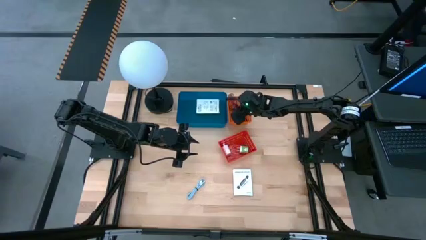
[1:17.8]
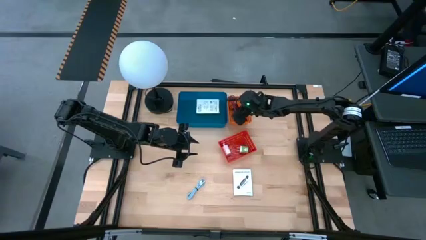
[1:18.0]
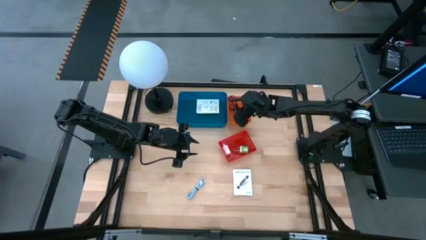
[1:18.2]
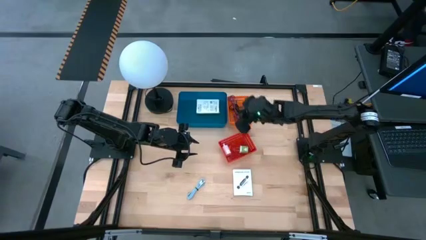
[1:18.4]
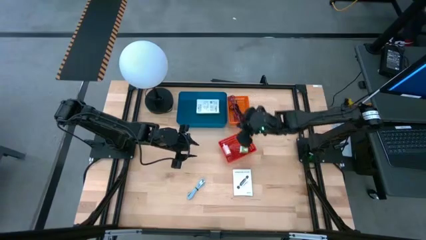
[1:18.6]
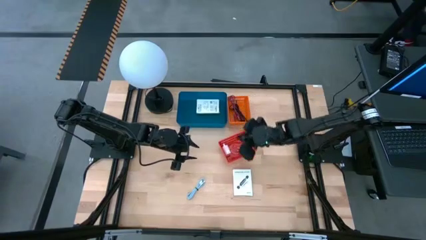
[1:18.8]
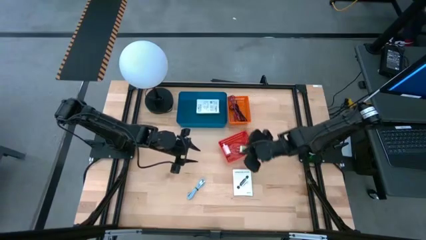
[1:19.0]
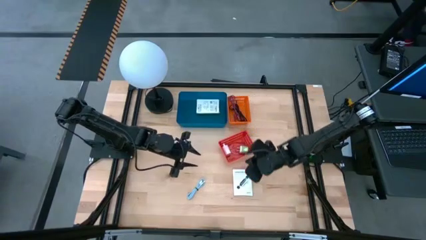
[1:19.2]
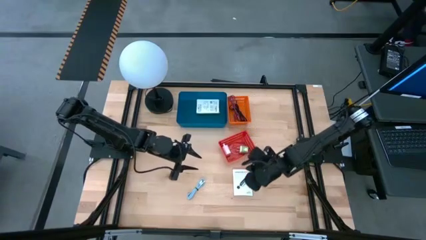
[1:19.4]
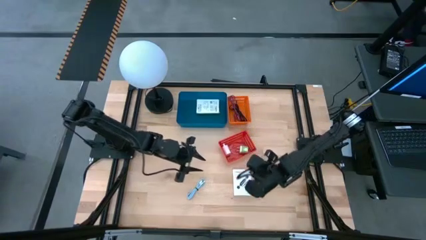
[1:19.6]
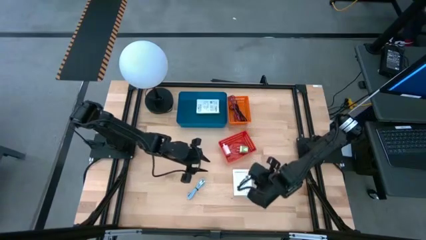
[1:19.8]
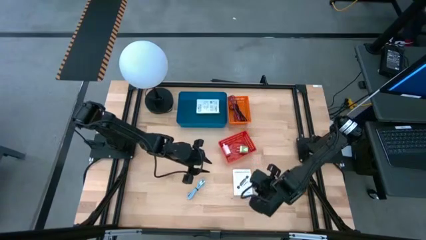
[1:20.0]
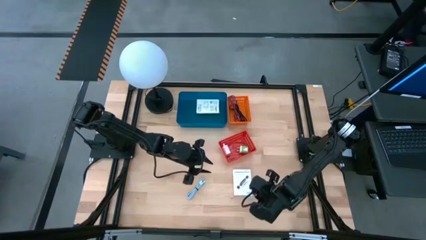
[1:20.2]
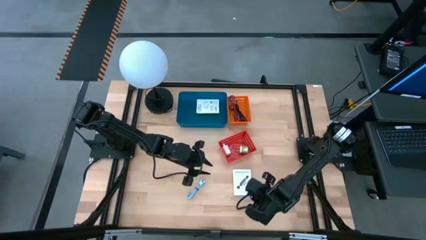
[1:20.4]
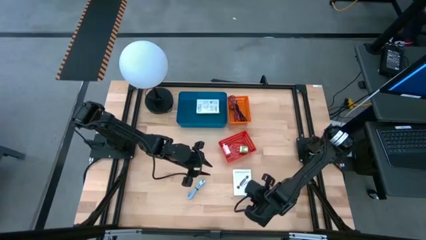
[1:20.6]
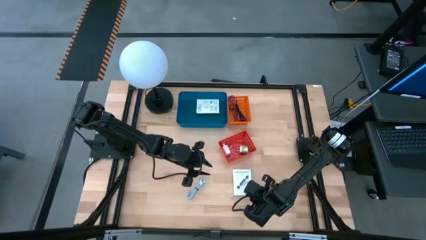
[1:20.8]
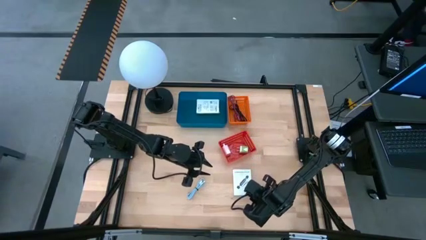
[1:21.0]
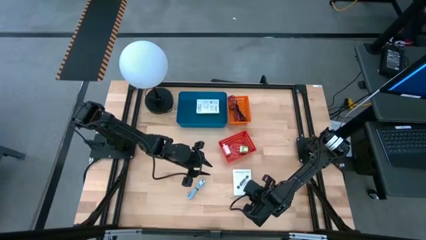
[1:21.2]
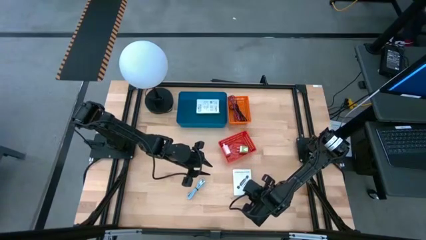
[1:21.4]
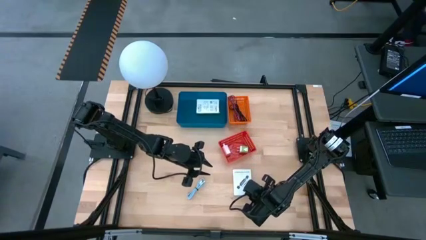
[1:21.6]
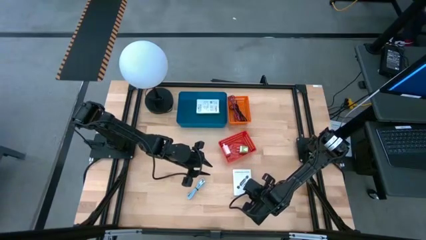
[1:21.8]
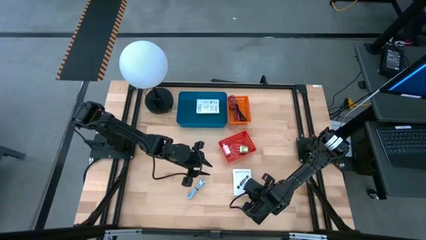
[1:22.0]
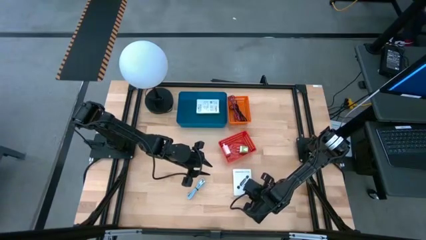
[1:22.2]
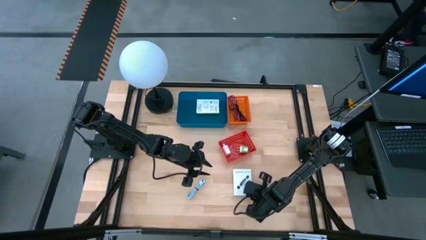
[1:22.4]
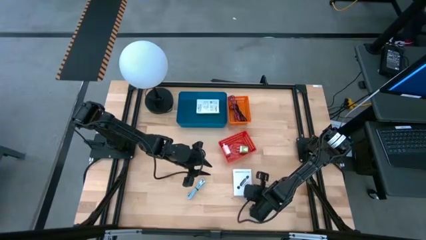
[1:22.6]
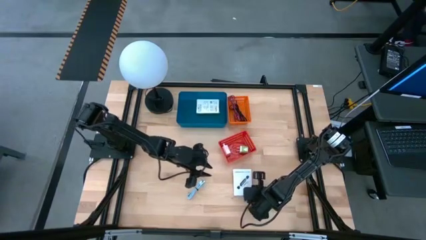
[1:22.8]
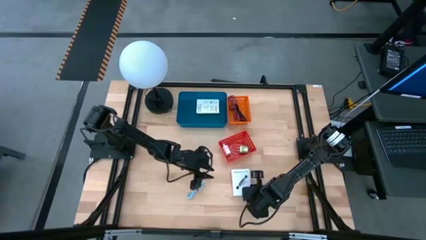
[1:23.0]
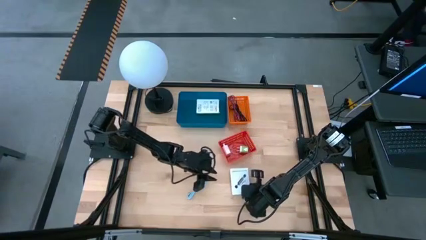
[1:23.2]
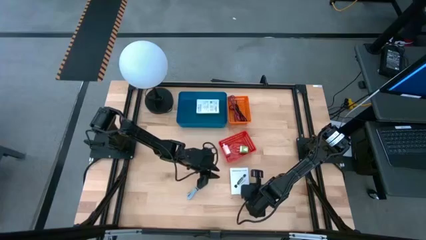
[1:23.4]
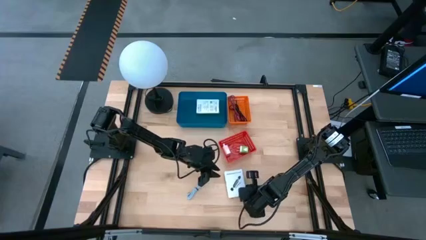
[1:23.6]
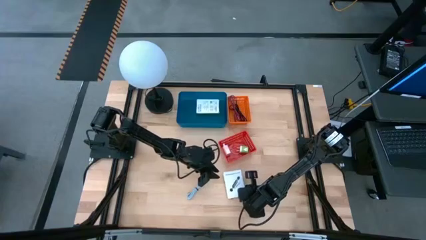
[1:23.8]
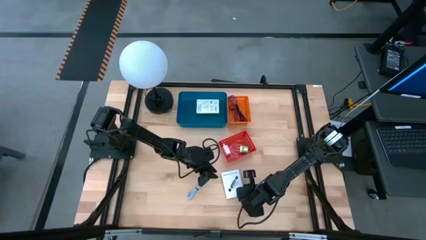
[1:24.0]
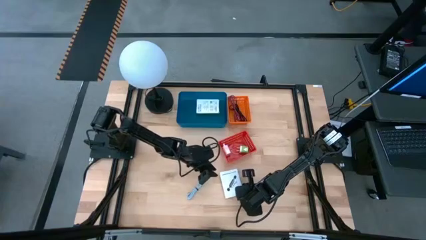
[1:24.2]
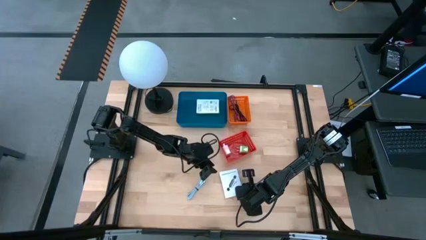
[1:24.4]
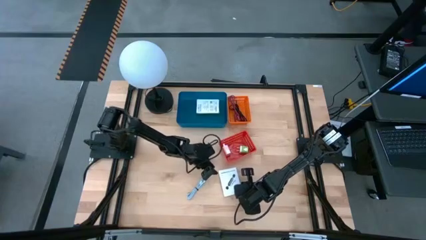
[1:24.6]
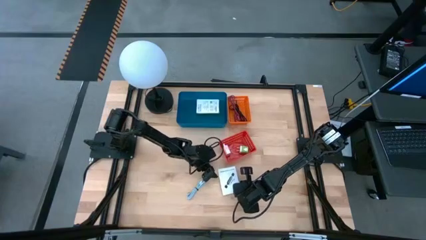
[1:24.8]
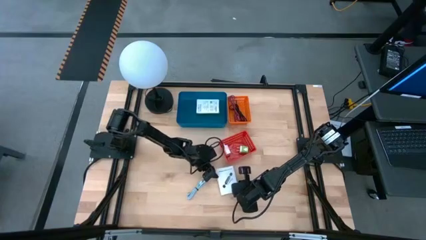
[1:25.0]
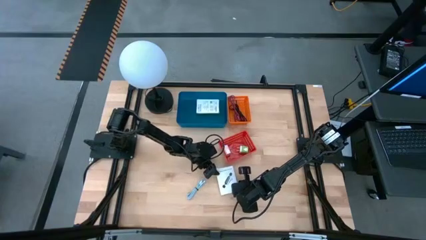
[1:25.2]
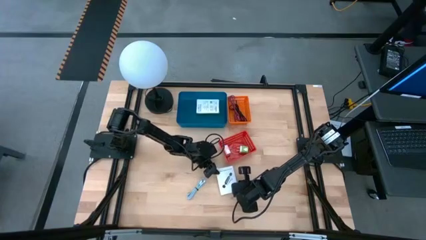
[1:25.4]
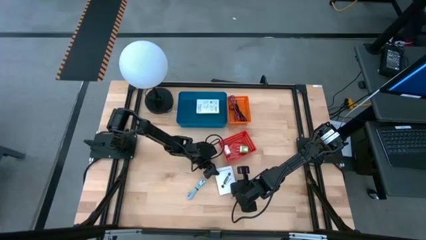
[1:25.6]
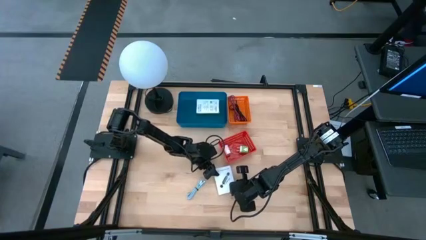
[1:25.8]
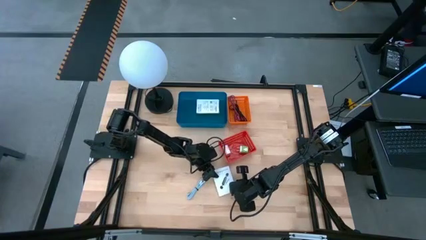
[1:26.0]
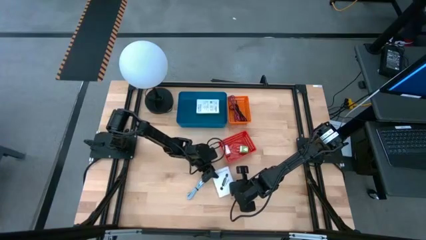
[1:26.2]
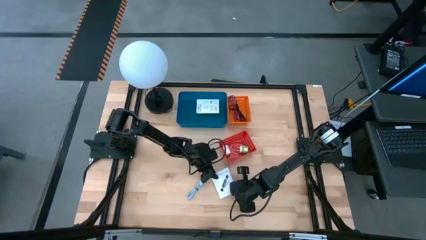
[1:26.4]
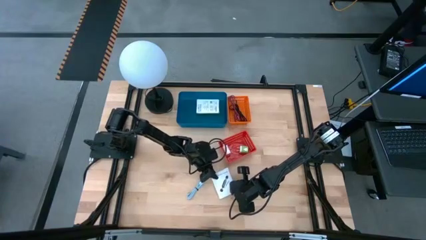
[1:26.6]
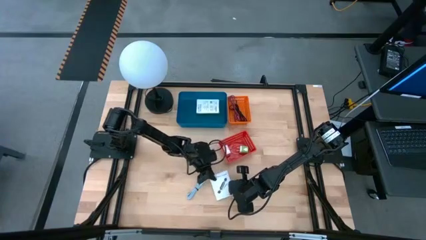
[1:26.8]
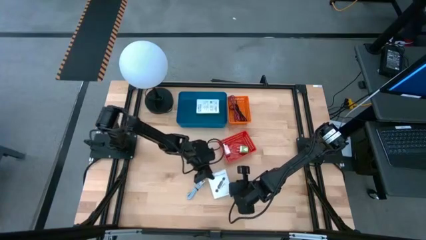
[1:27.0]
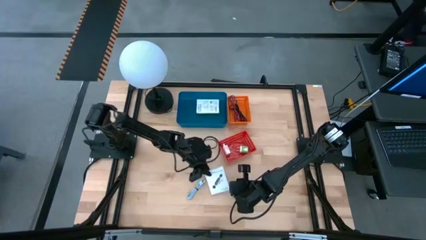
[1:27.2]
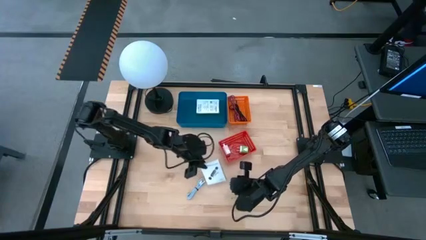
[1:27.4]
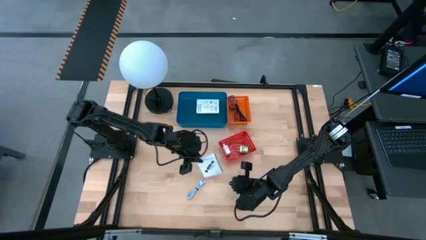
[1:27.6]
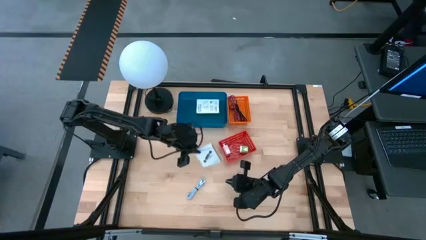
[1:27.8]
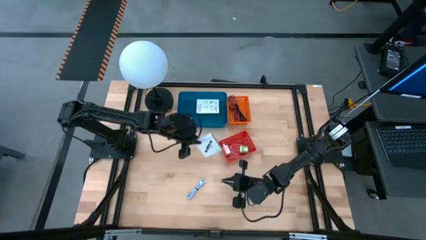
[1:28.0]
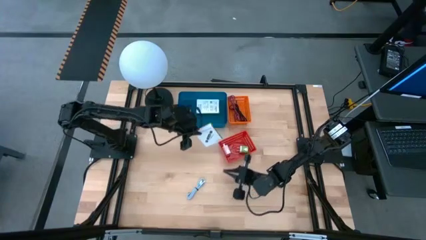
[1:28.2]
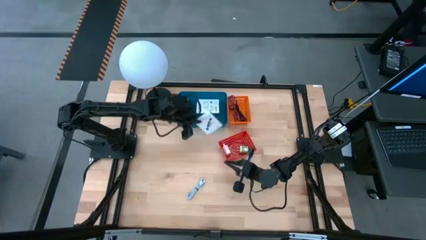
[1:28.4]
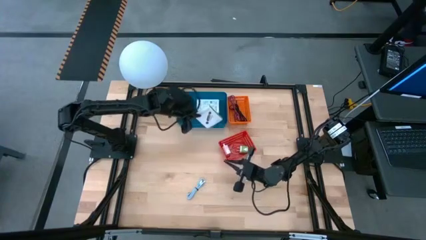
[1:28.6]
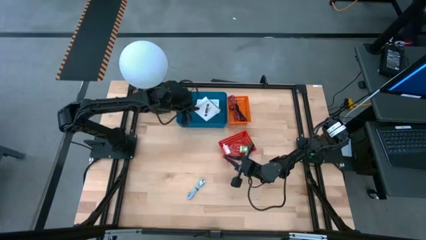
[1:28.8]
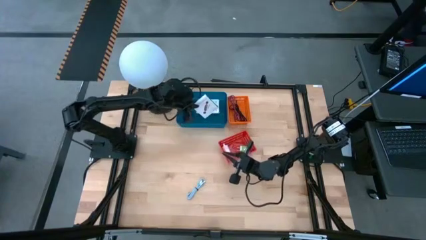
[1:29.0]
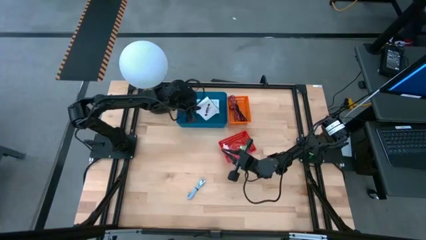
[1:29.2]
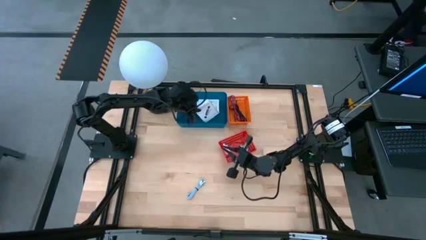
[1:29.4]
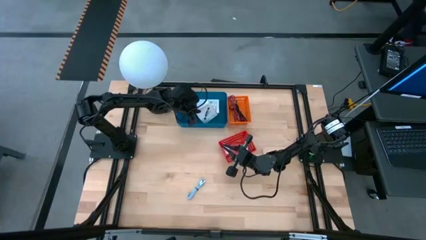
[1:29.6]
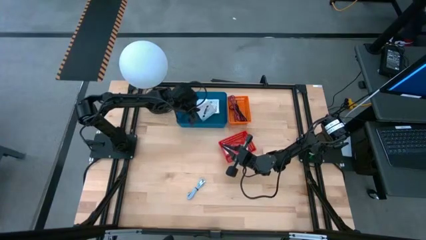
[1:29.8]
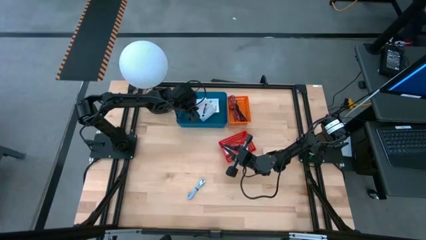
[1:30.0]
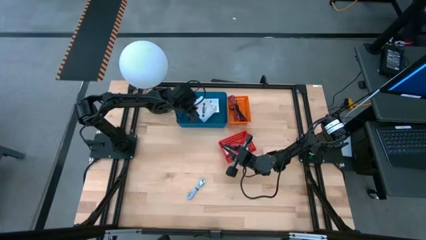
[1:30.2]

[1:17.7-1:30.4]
Task: Pick and place items into bin
Put the card reader box into the blue bin

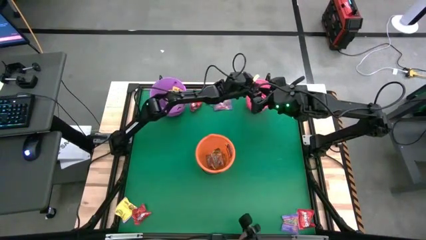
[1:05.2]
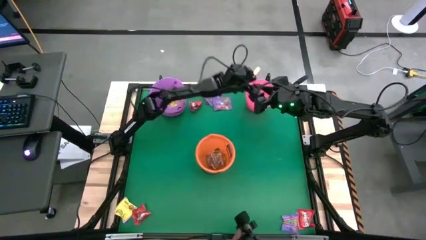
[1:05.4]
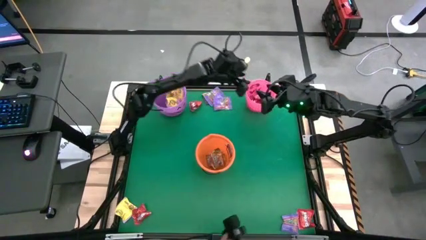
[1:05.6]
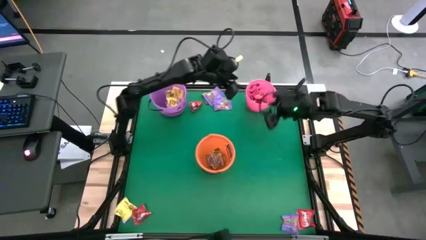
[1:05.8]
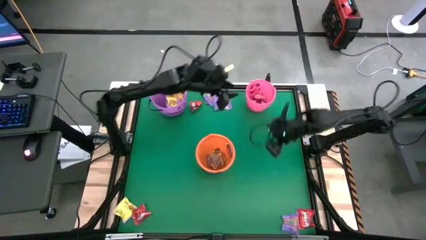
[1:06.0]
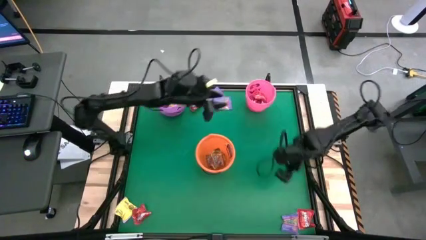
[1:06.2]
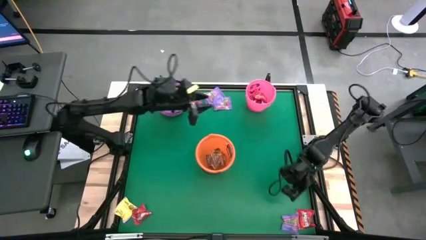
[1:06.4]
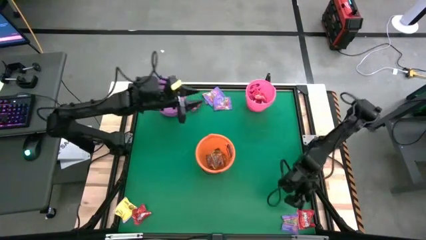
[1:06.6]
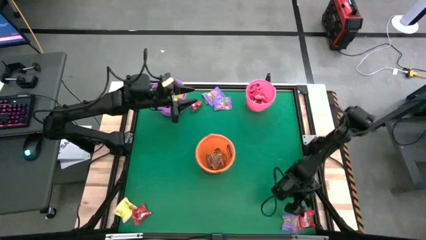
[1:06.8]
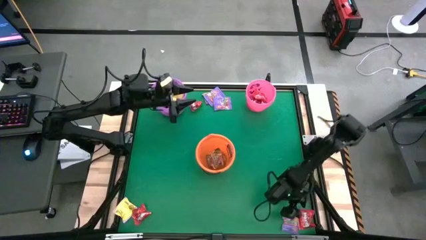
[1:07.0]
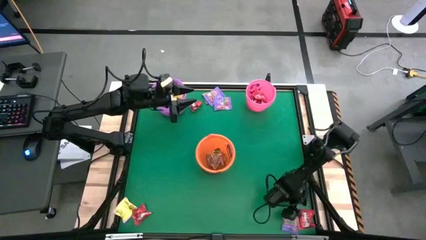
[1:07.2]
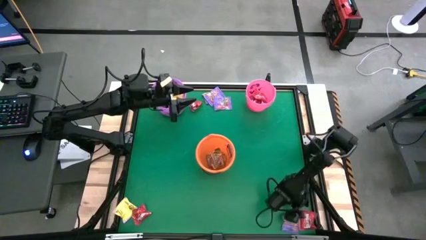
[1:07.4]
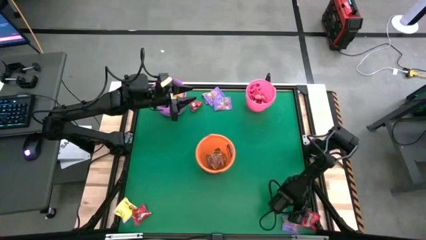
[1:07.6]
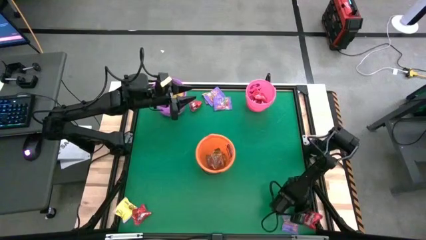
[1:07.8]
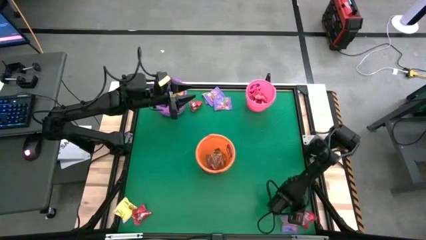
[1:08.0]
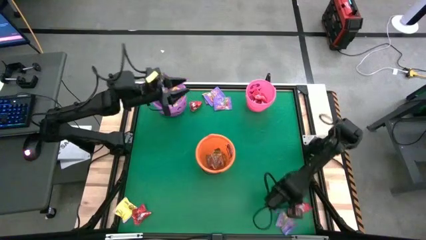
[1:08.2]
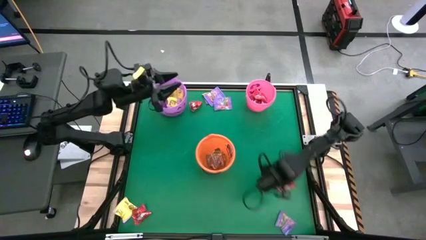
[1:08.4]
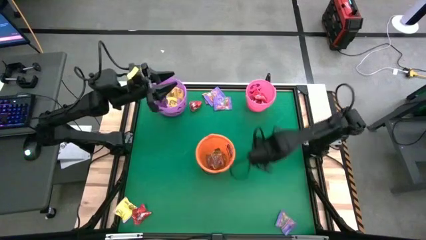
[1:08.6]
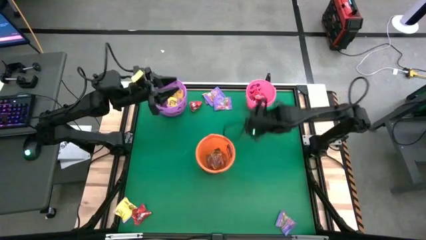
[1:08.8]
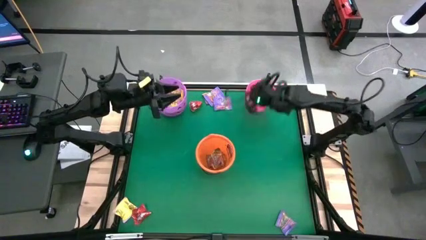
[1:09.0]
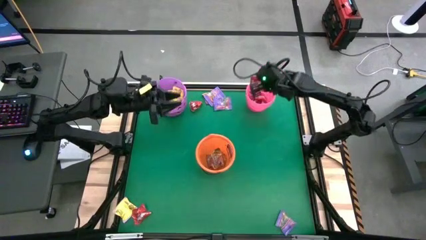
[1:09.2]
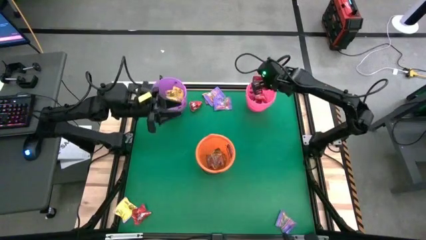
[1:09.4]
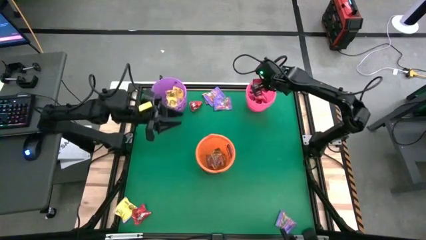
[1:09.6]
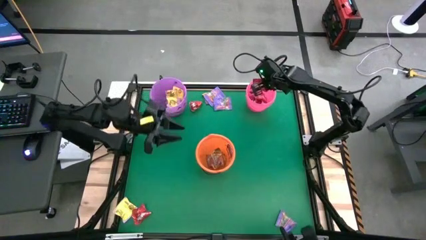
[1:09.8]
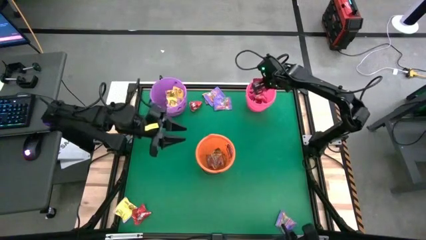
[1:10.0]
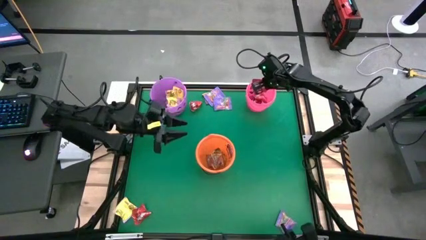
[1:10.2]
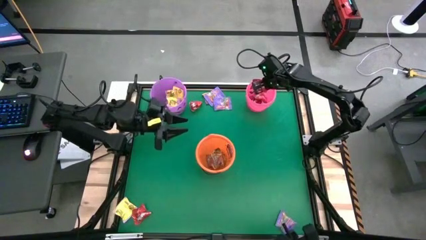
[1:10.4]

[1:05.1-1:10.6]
Task: Sort candy by brand, put in halloween buckets
Put the red candy into the pink bucket
